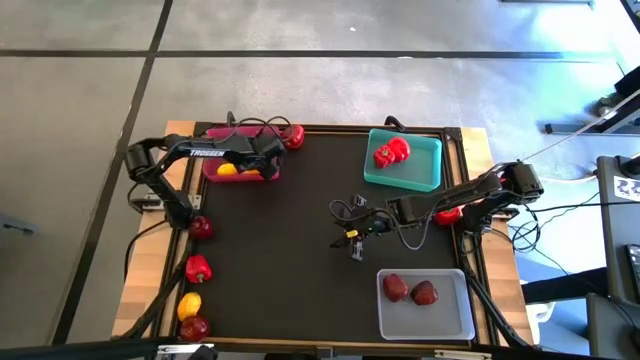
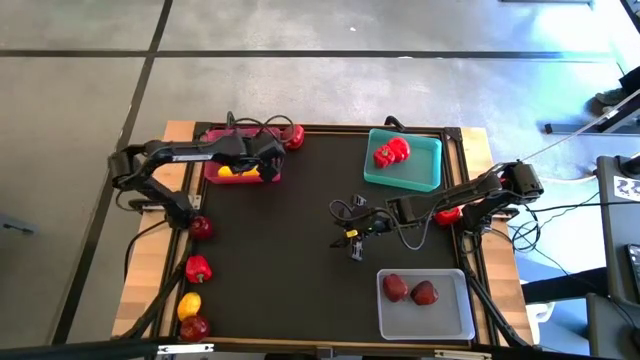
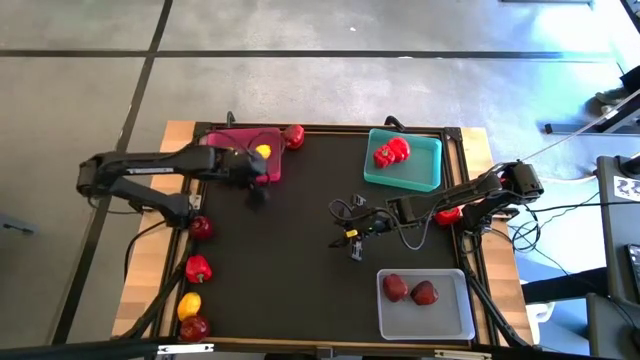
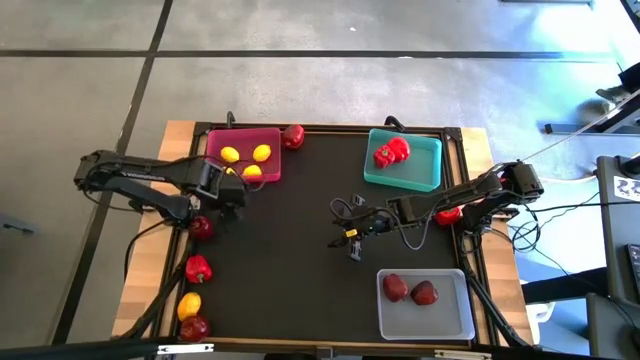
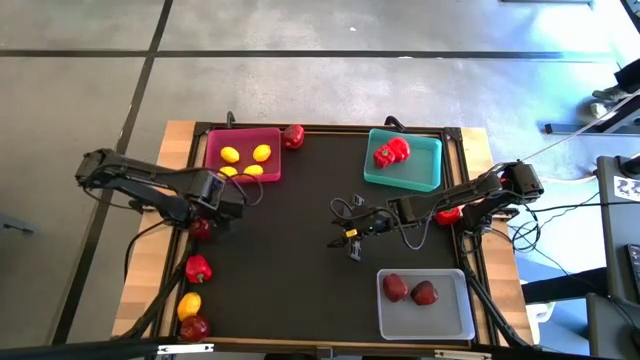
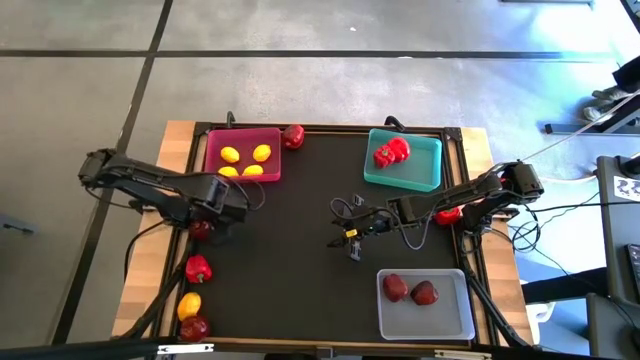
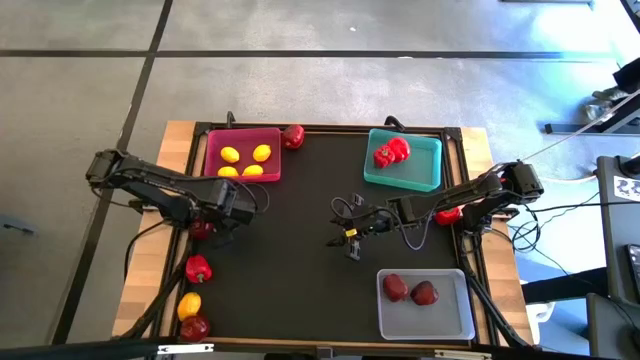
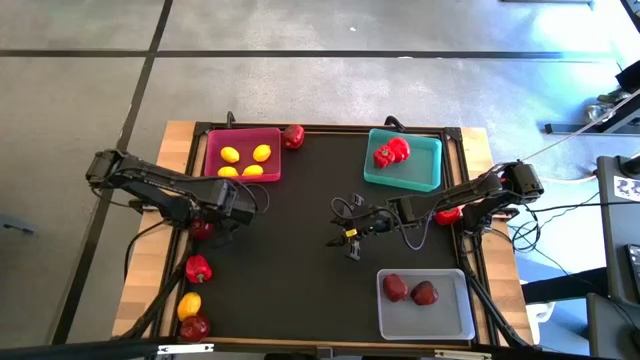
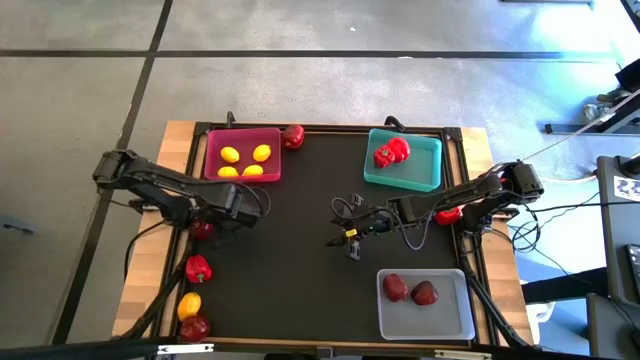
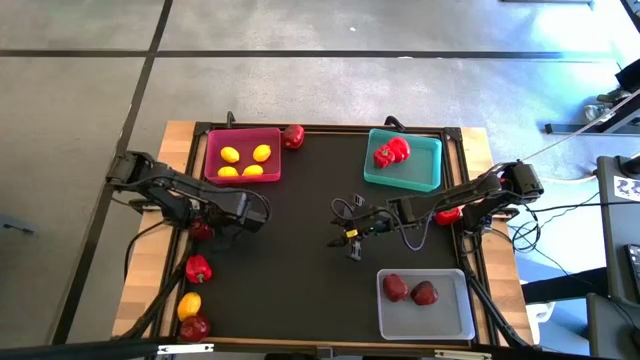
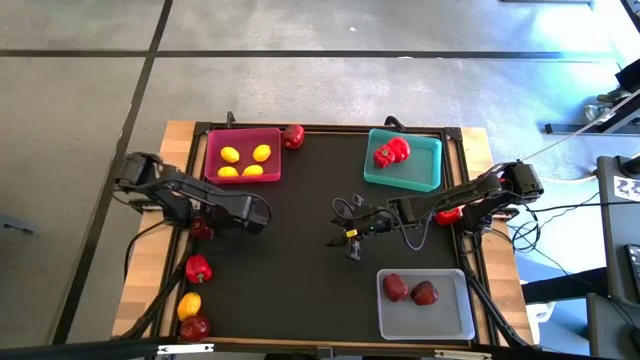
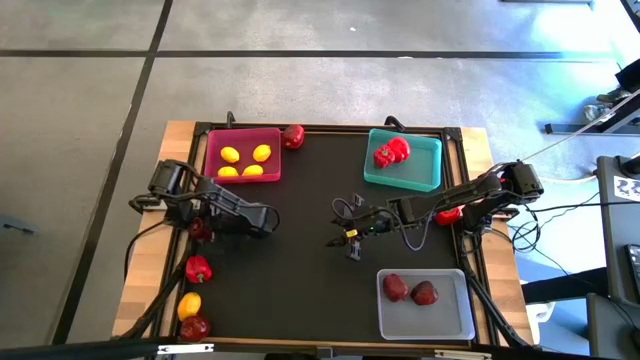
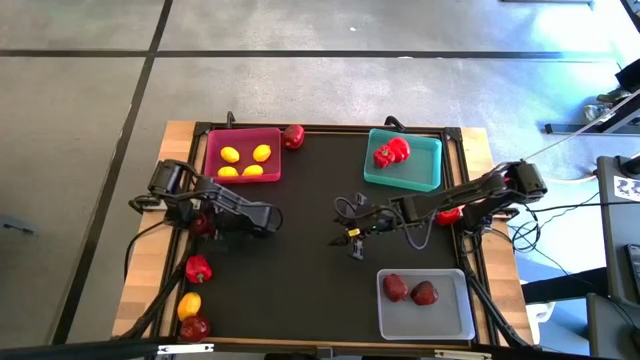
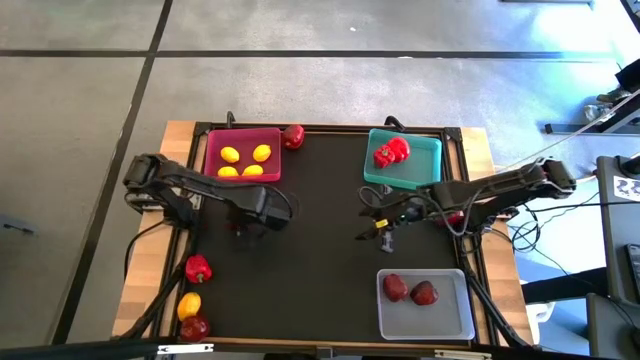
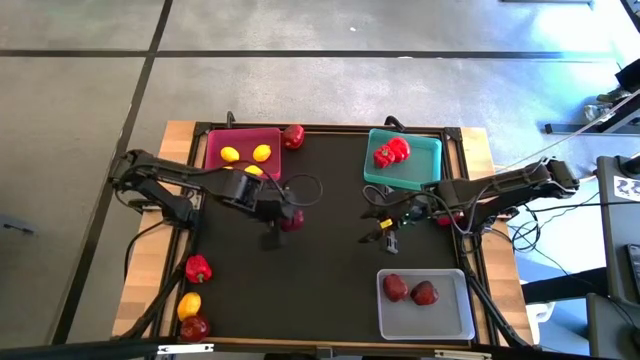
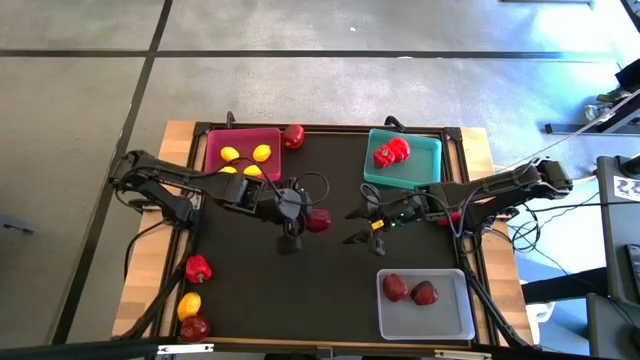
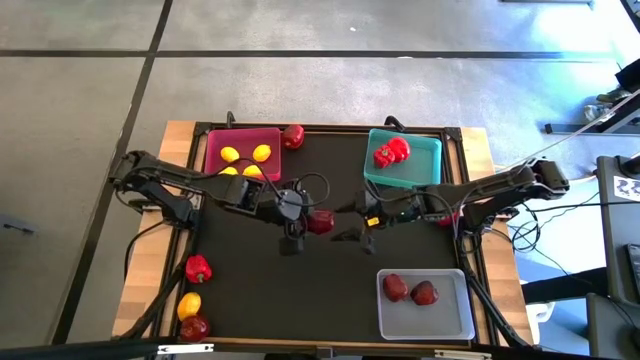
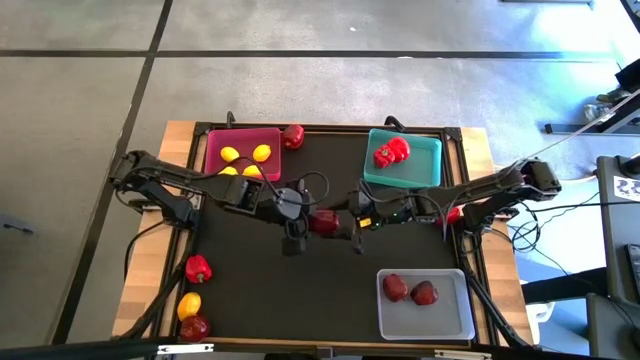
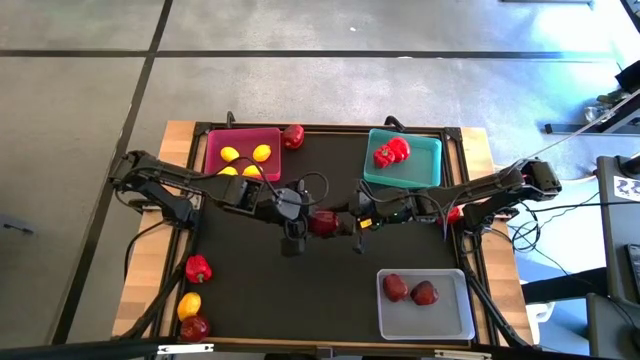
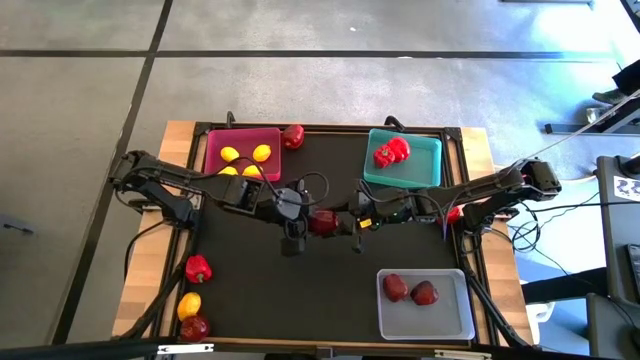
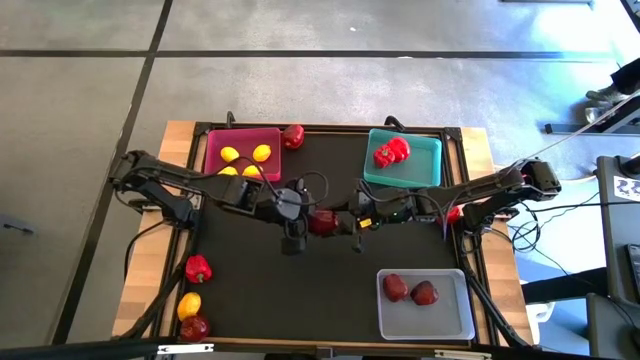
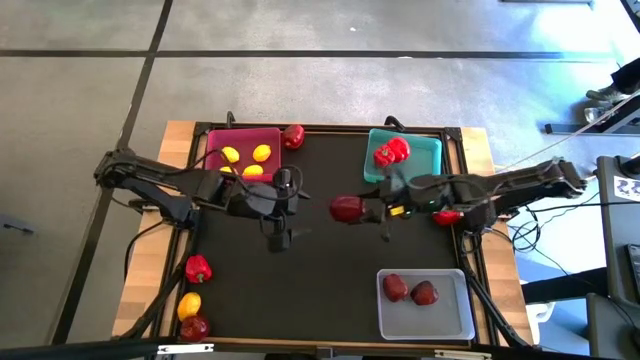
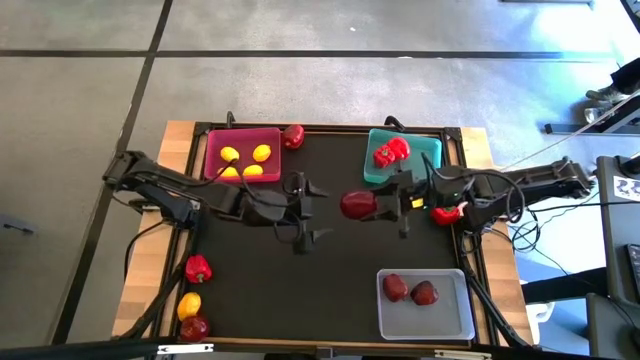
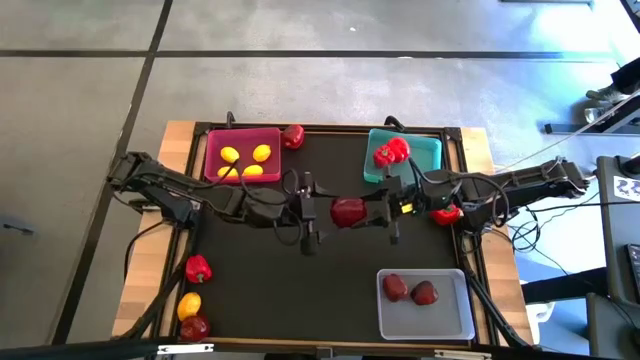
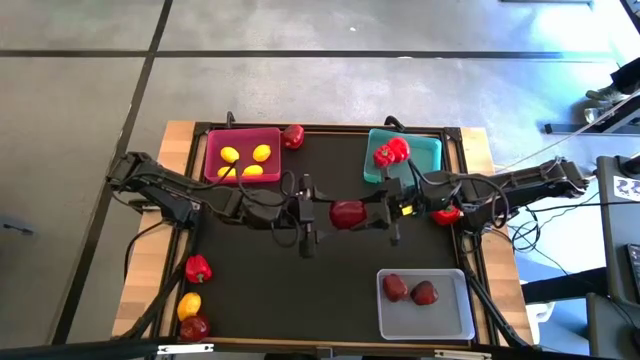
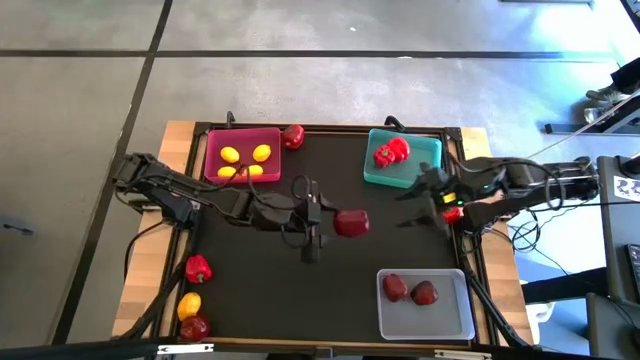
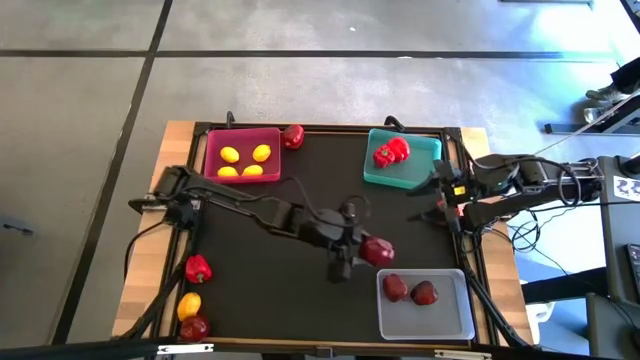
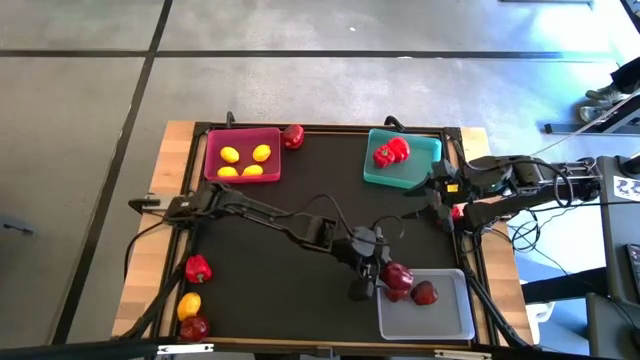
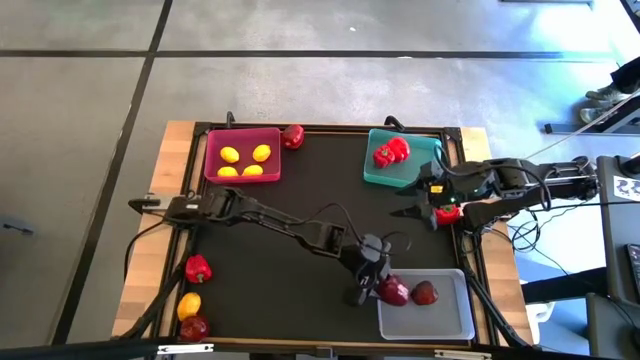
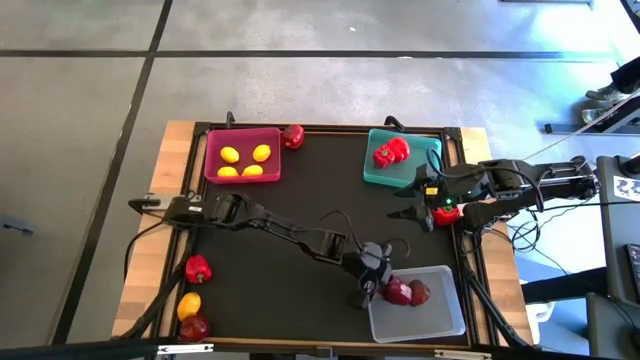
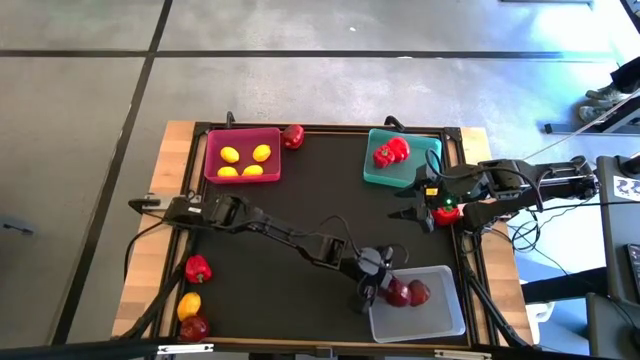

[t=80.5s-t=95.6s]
Task: Sort produce into baskets
Put the apple into the transparent bin

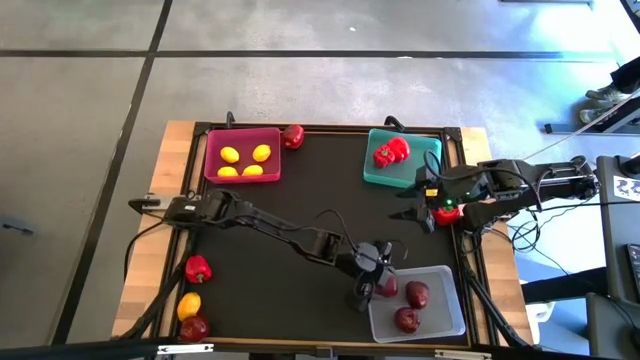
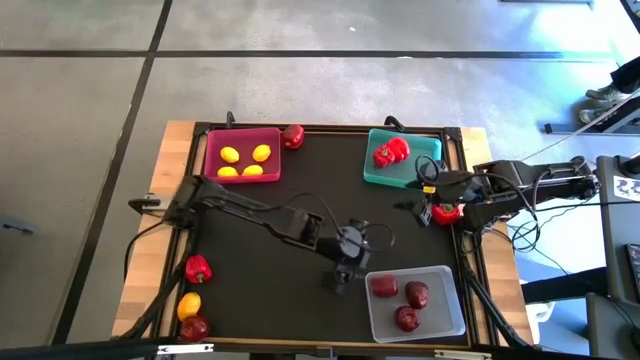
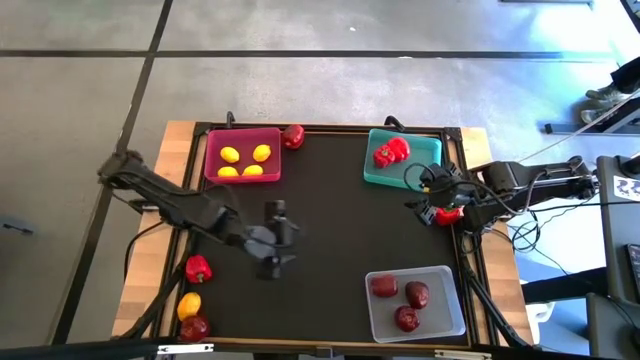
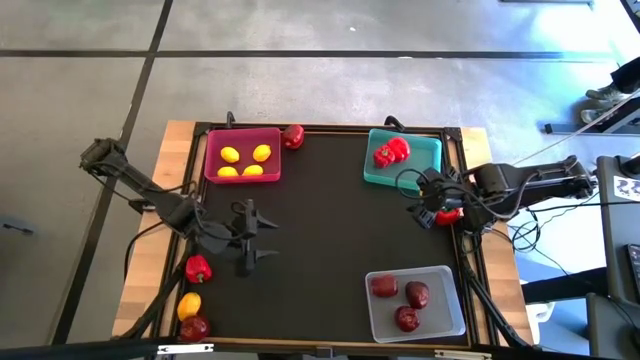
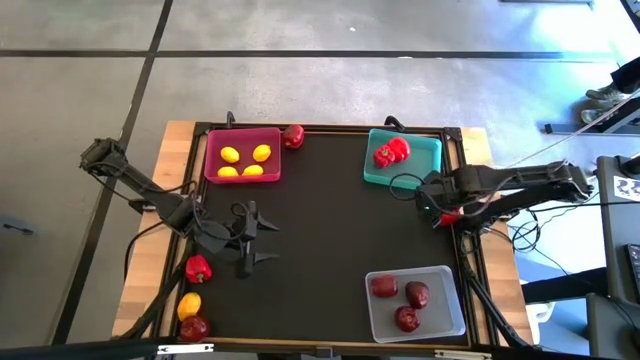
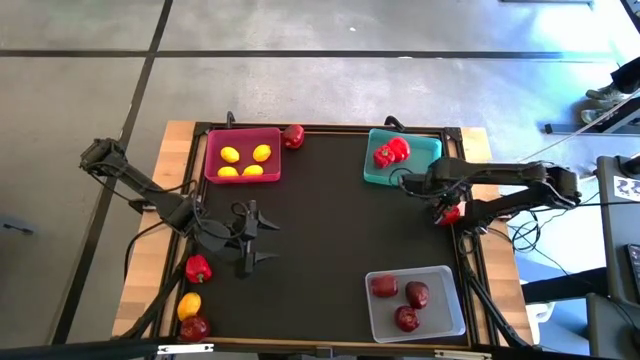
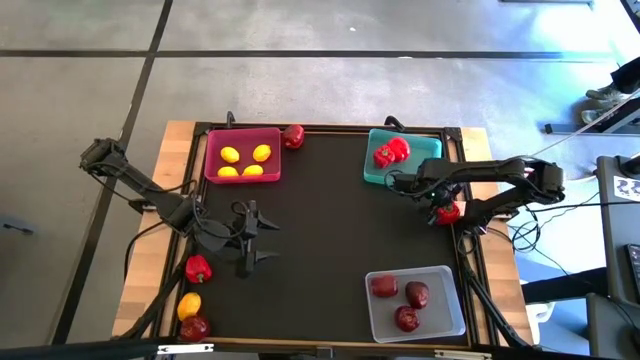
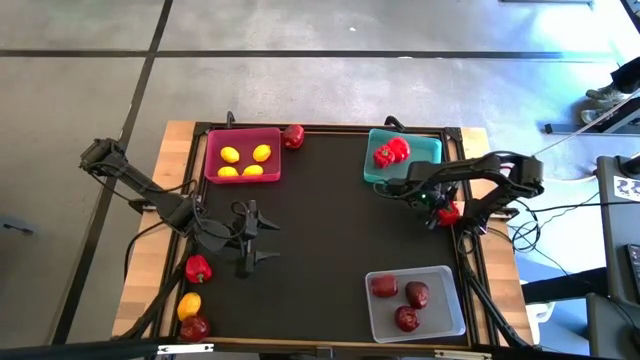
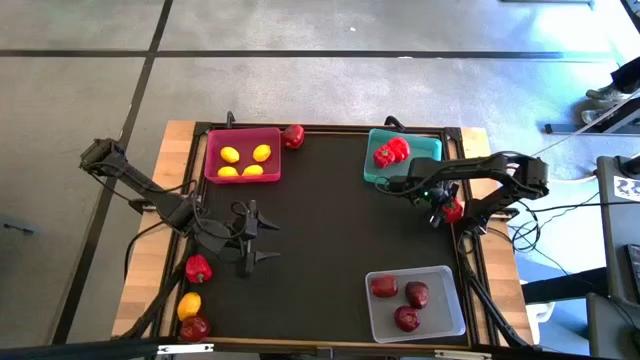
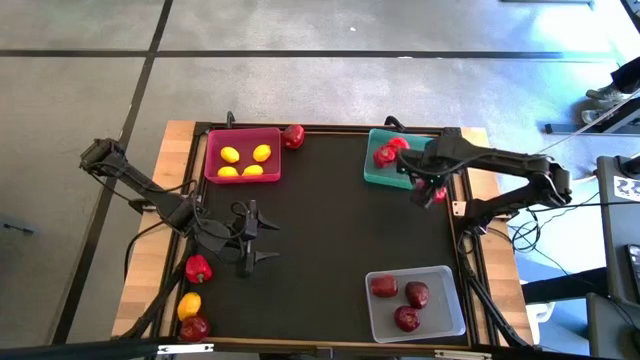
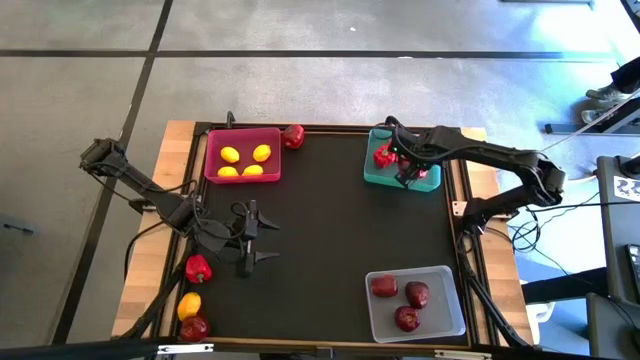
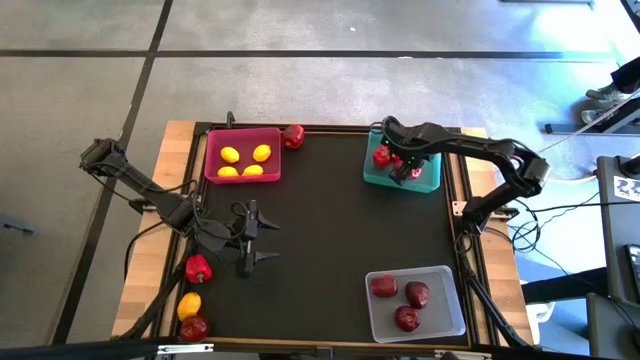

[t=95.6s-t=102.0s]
Put the bell pepper into the blue bin
